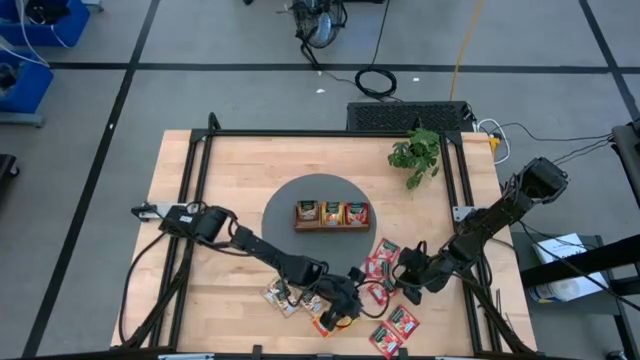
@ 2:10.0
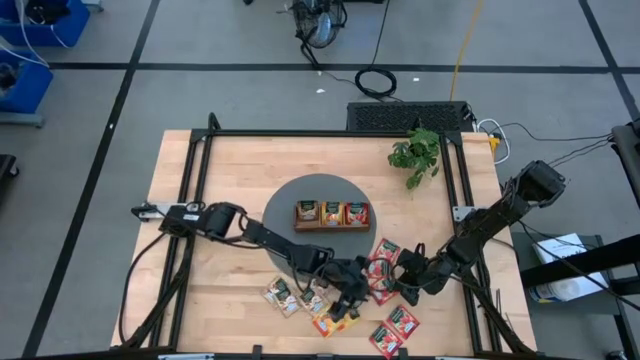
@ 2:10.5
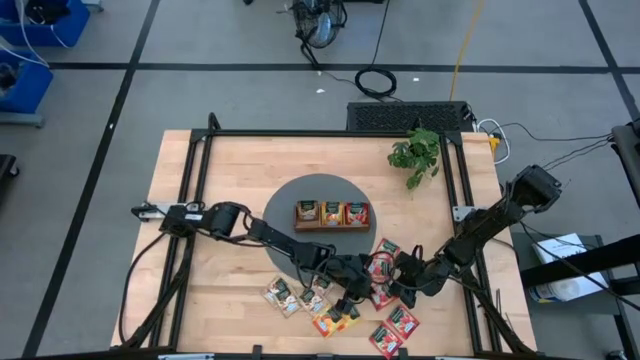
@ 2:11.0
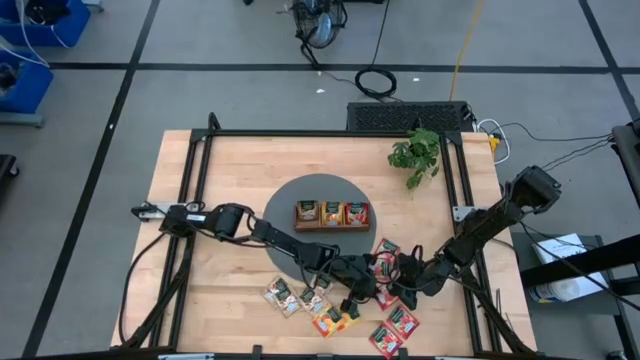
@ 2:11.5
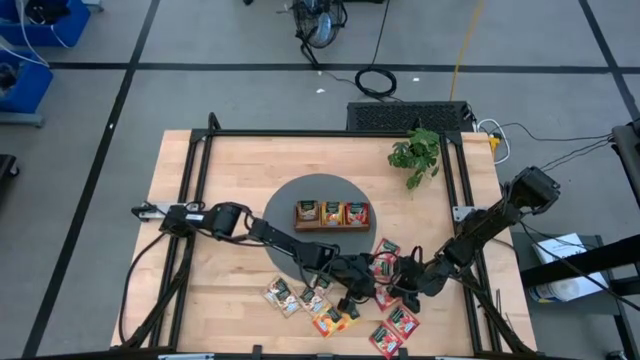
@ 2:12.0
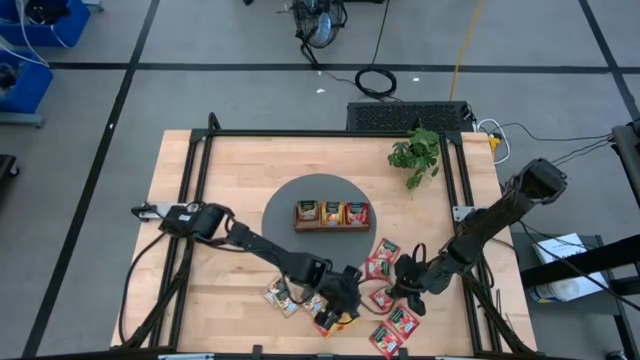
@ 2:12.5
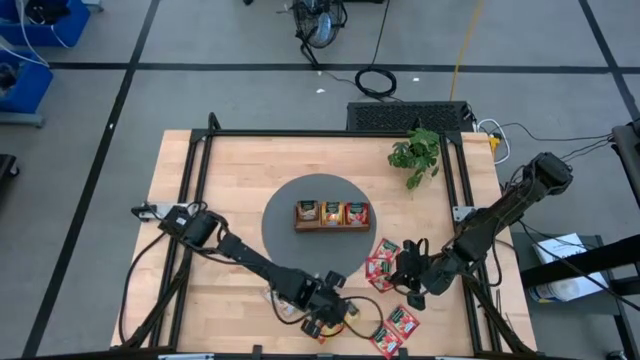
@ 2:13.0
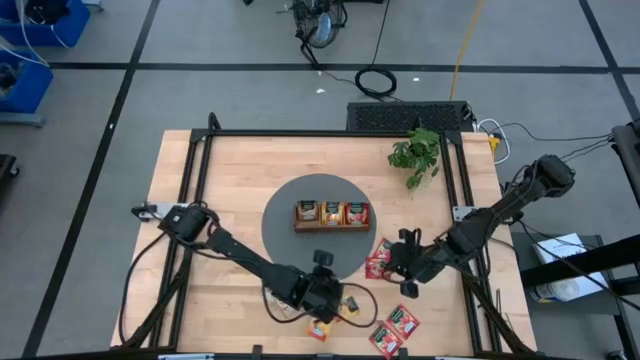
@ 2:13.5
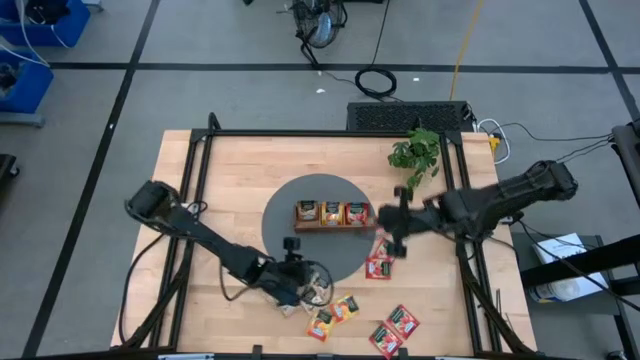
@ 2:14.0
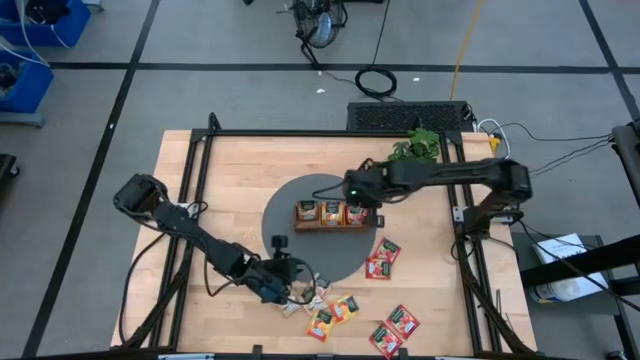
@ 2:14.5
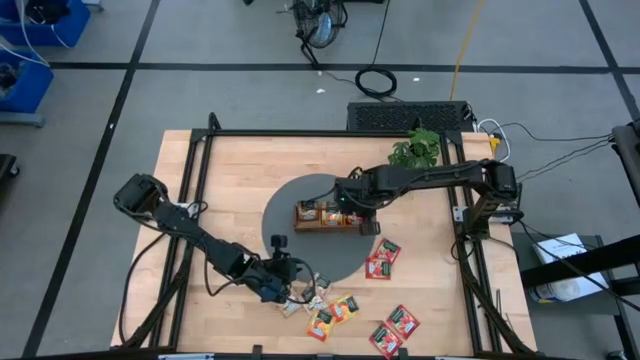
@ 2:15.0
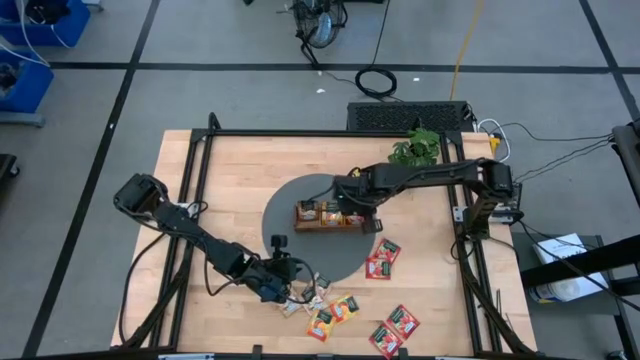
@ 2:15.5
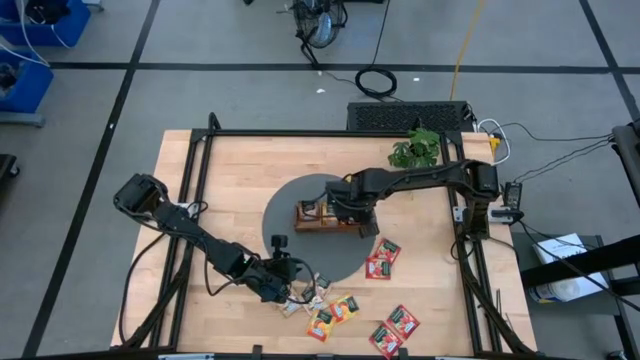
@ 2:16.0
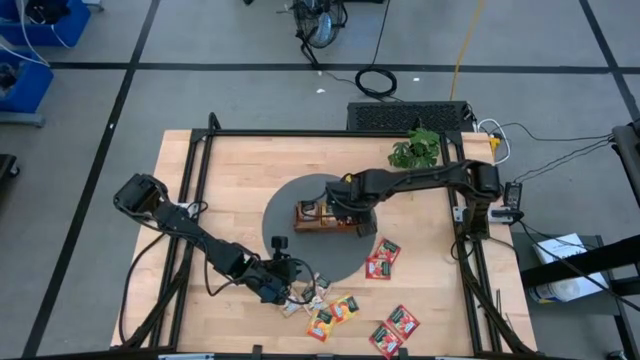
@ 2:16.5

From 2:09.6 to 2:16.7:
Task: Pick & Place Tea
Put the red tea sachet into the right section of the wooden organizer

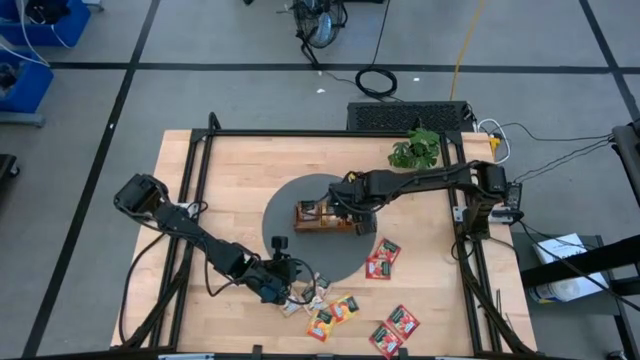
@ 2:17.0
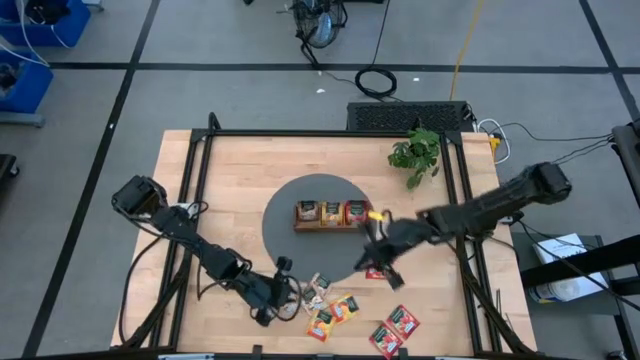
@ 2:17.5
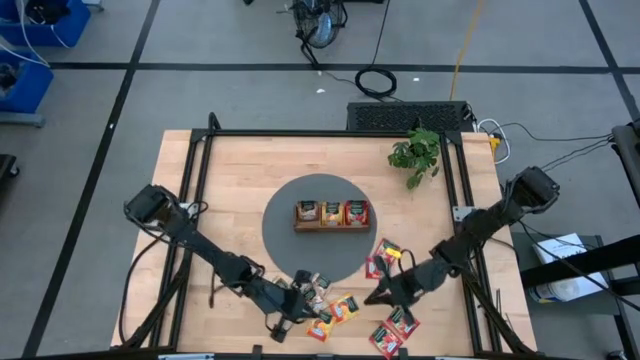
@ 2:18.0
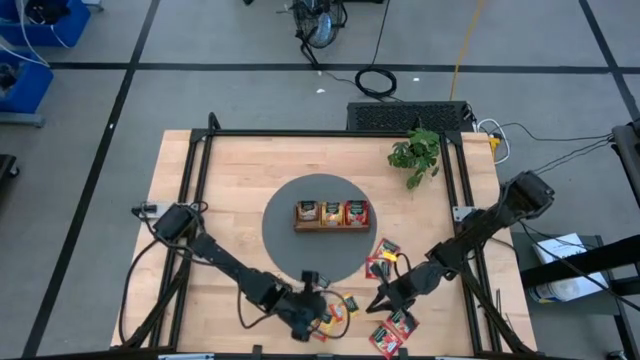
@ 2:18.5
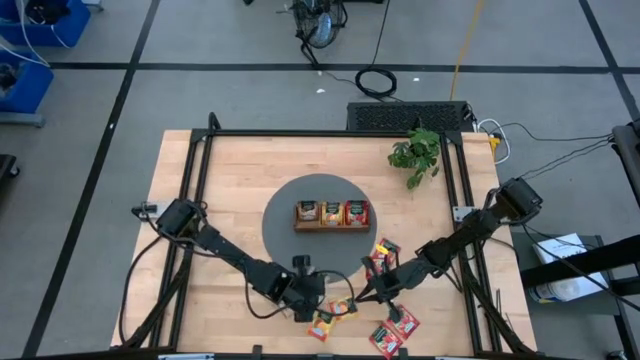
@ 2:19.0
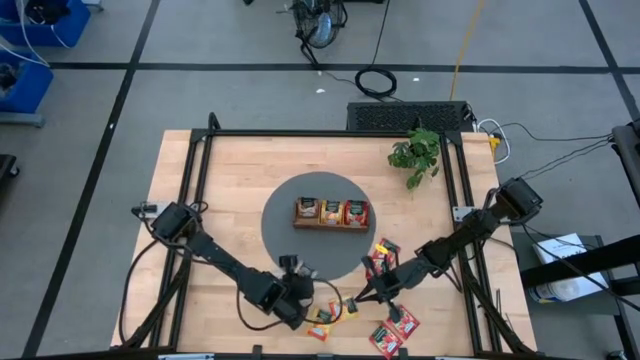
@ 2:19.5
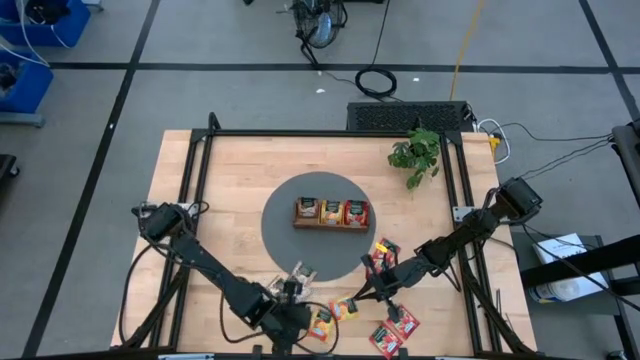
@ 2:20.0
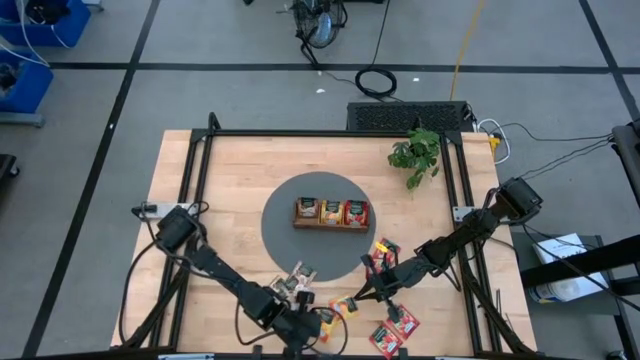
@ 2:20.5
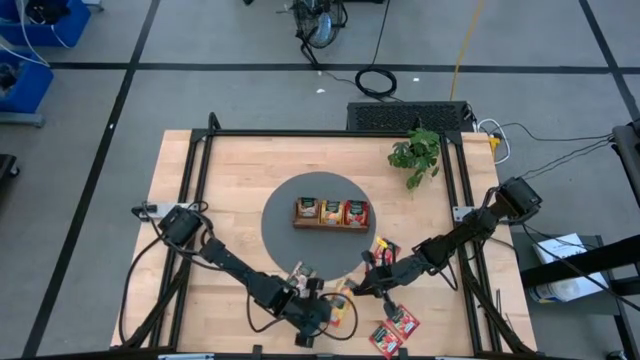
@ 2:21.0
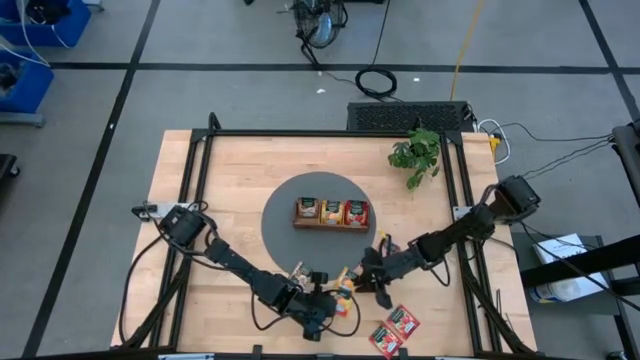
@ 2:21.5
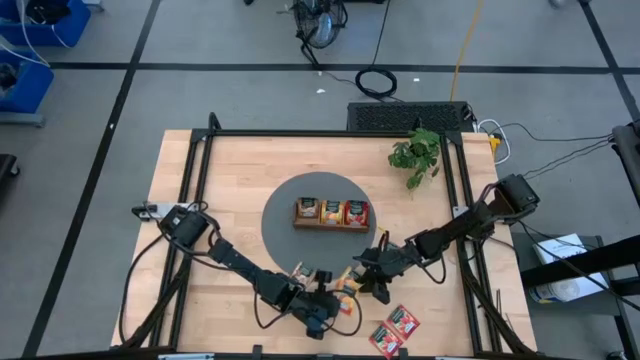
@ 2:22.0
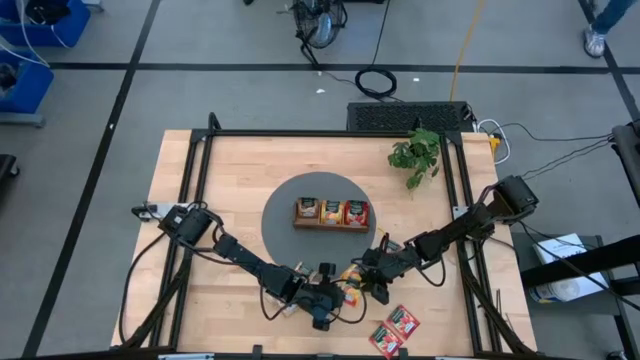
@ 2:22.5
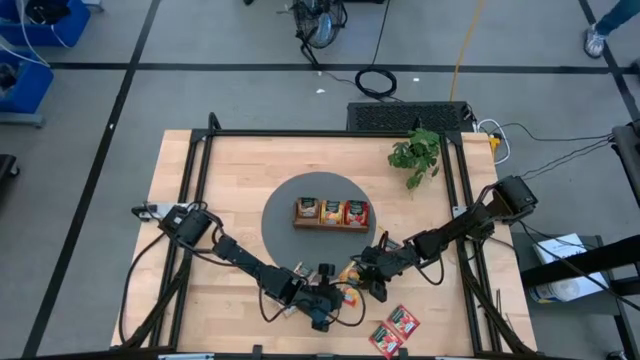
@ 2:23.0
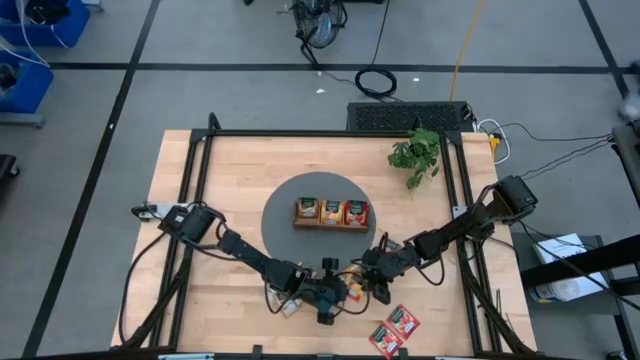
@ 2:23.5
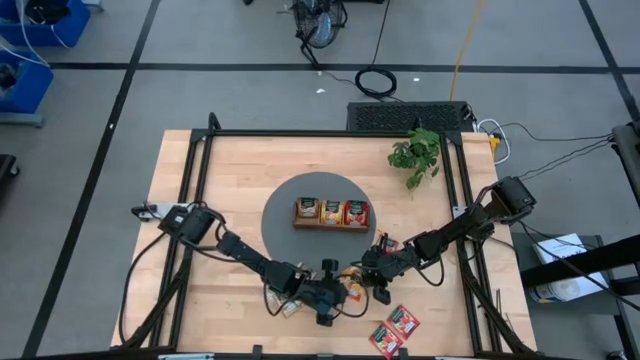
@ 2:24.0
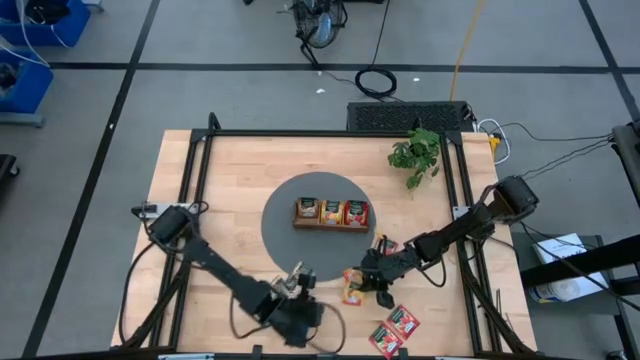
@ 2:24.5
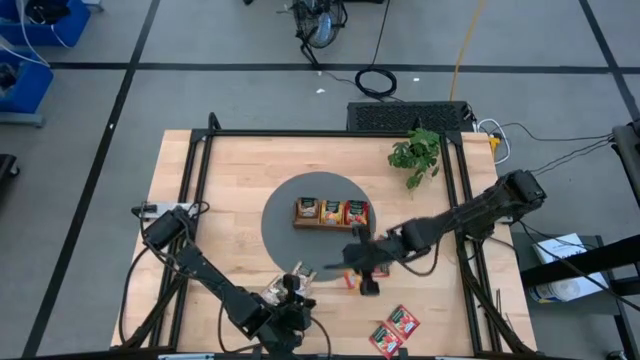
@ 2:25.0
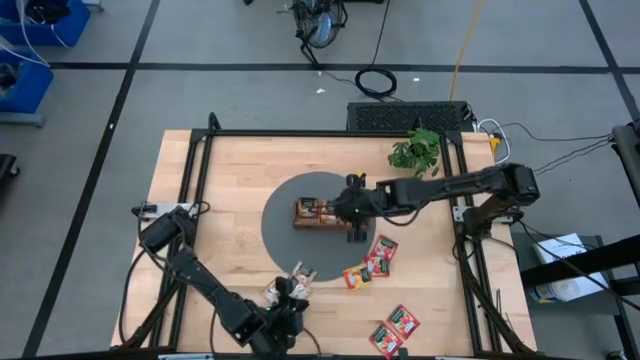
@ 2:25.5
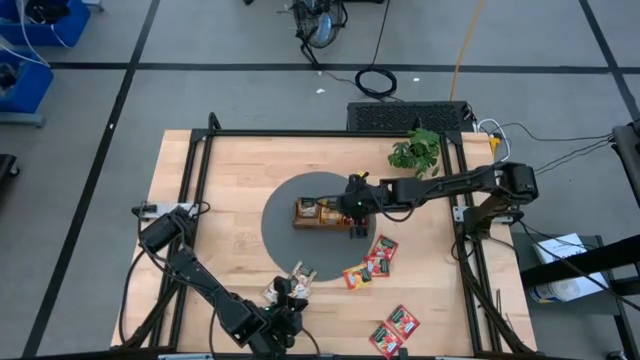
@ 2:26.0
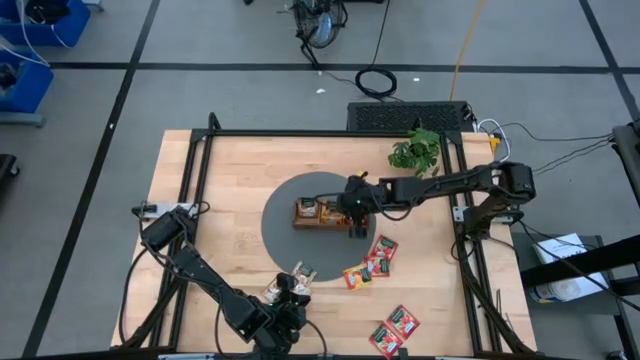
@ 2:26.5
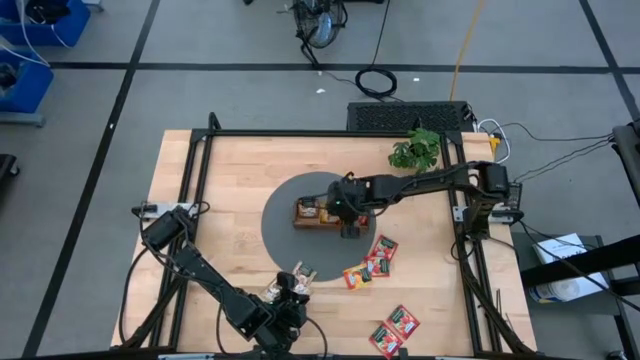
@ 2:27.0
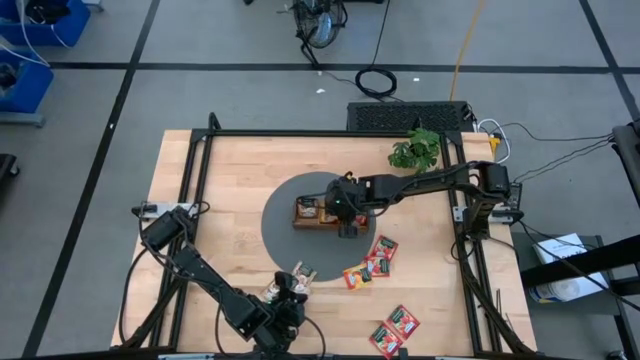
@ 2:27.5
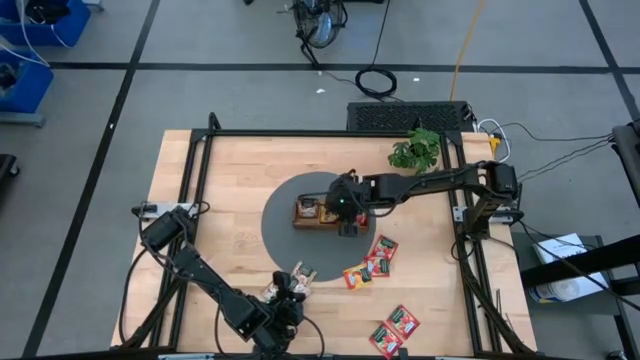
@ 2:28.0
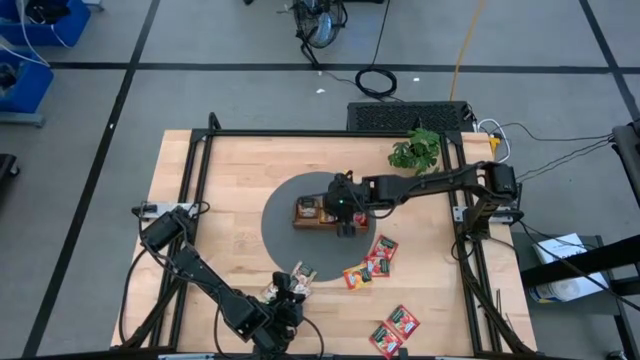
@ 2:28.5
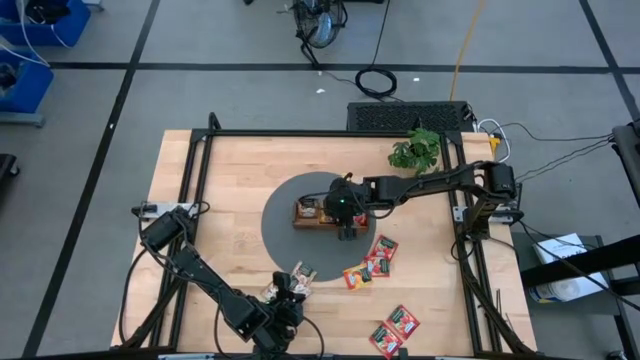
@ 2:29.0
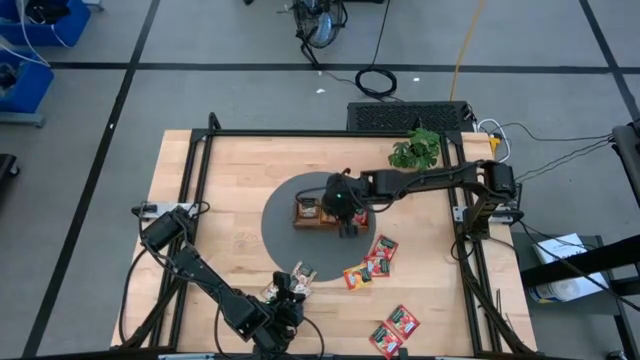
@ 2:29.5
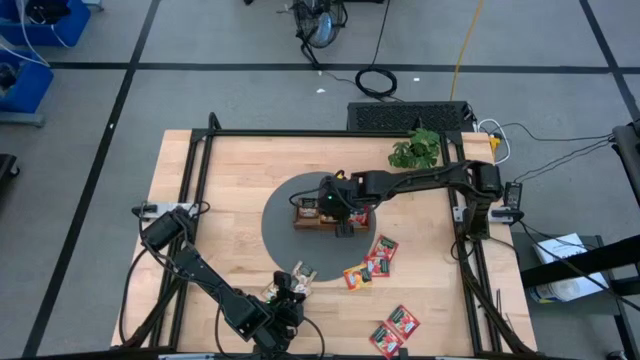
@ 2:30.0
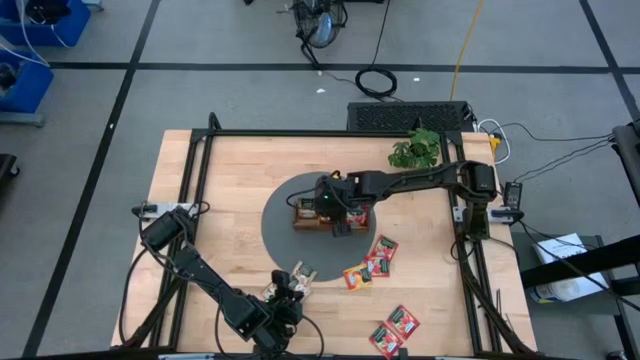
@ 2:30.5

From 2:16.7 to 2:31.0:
Put the left yellow tea sachet into the middle section of the wooden organizer
